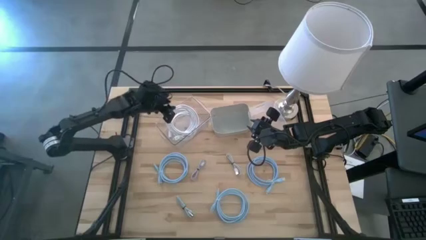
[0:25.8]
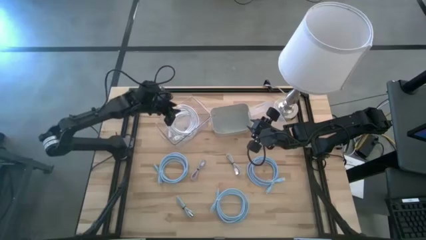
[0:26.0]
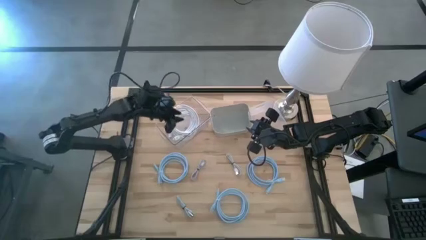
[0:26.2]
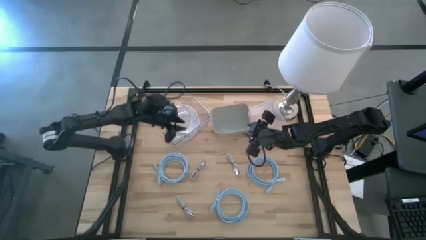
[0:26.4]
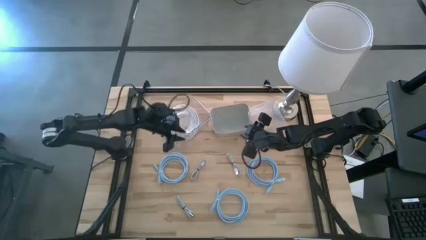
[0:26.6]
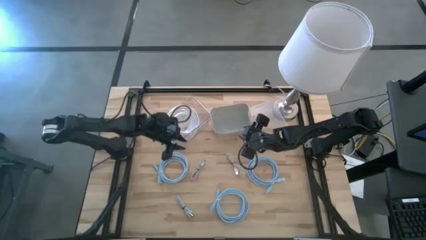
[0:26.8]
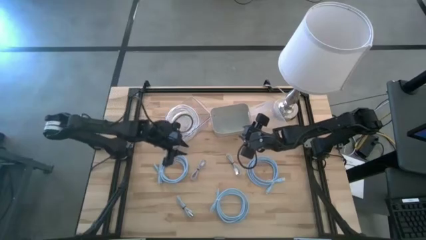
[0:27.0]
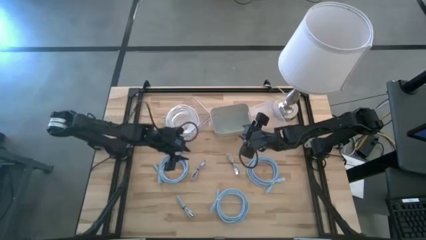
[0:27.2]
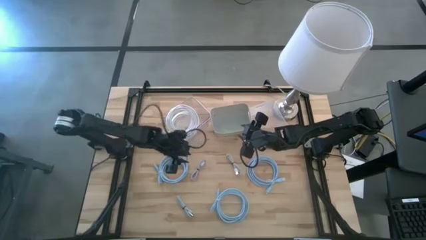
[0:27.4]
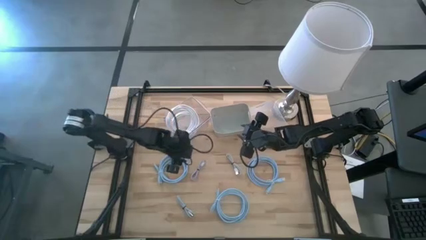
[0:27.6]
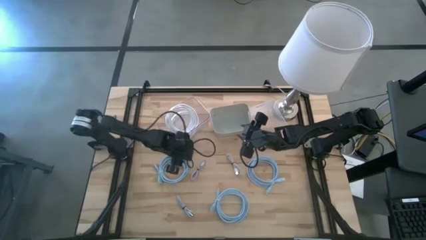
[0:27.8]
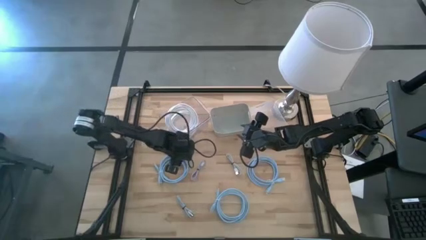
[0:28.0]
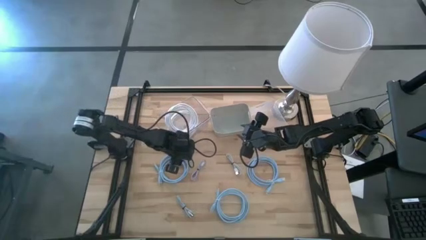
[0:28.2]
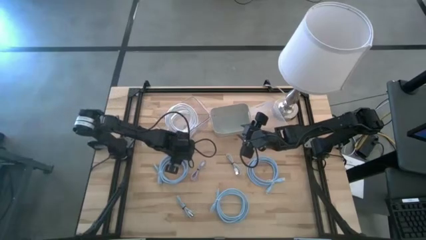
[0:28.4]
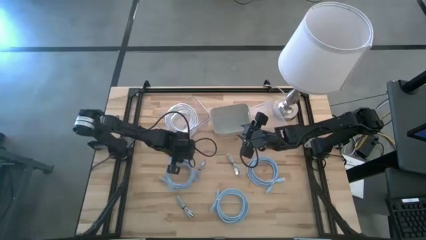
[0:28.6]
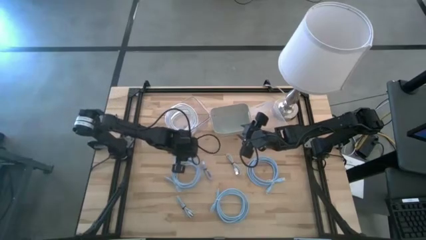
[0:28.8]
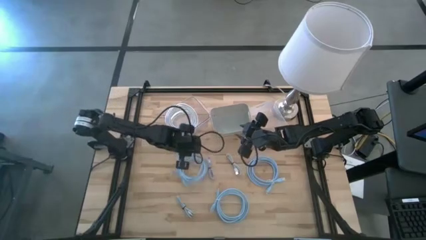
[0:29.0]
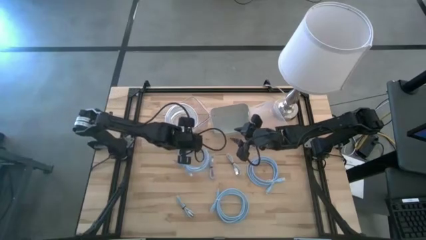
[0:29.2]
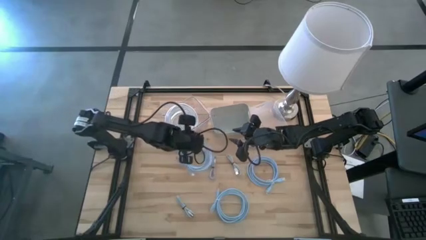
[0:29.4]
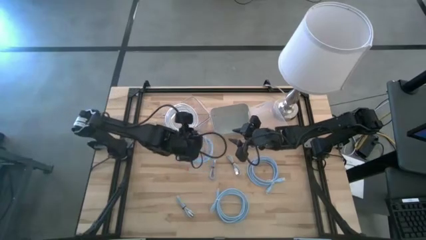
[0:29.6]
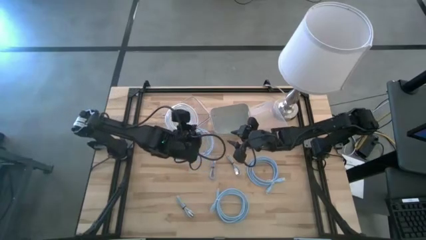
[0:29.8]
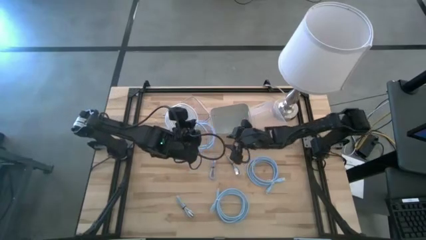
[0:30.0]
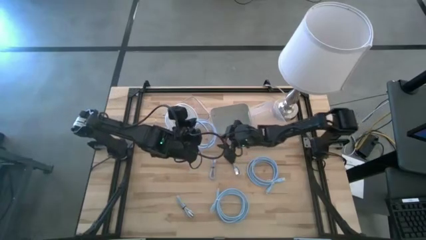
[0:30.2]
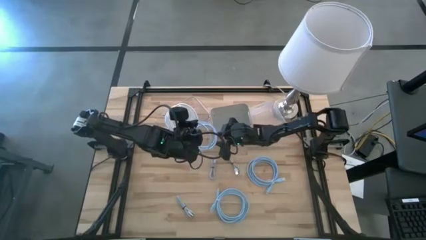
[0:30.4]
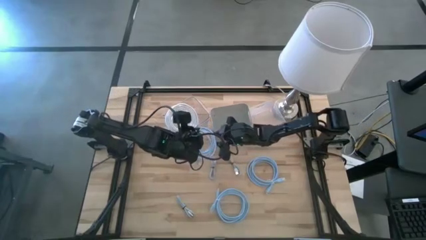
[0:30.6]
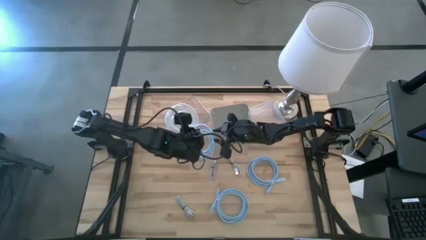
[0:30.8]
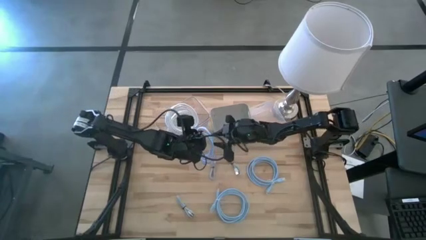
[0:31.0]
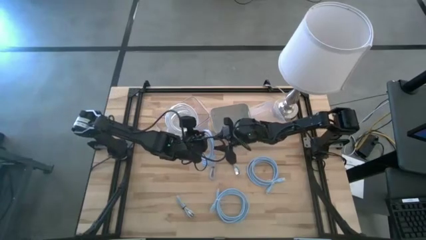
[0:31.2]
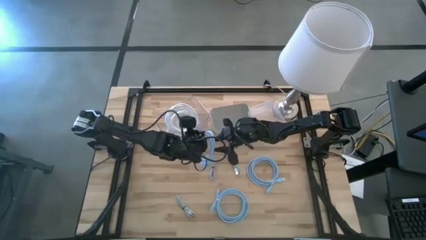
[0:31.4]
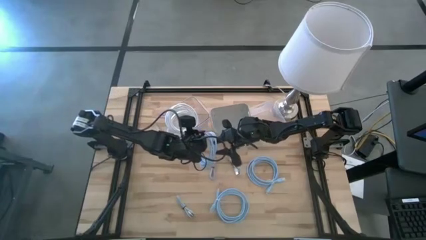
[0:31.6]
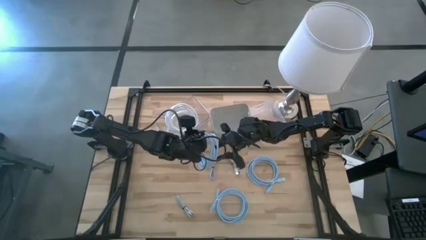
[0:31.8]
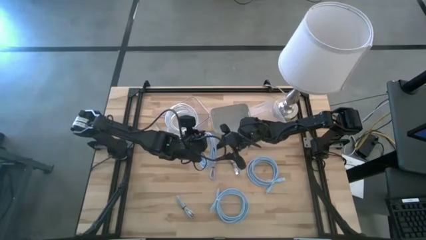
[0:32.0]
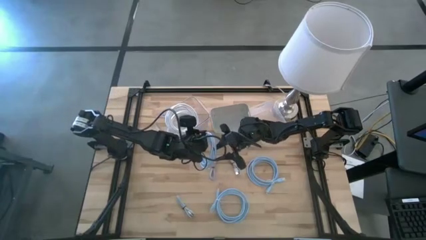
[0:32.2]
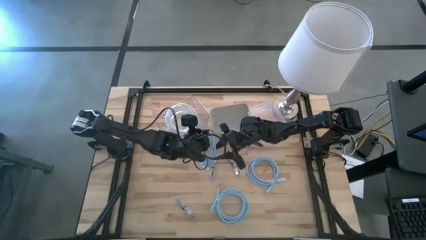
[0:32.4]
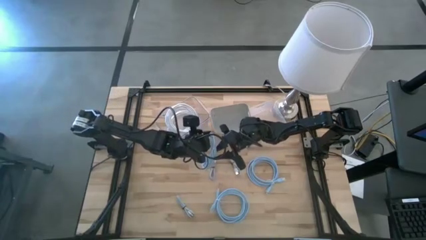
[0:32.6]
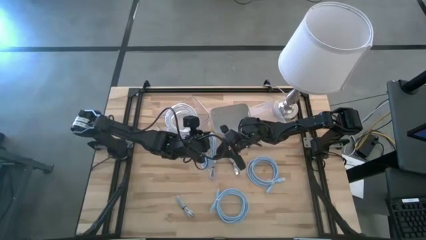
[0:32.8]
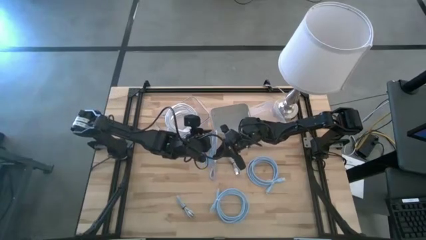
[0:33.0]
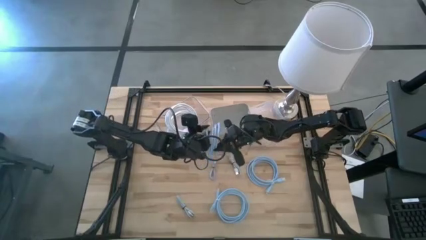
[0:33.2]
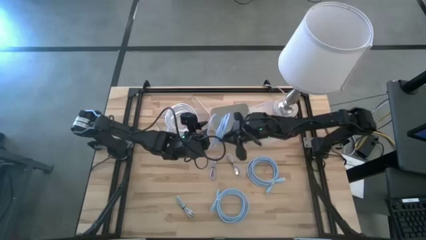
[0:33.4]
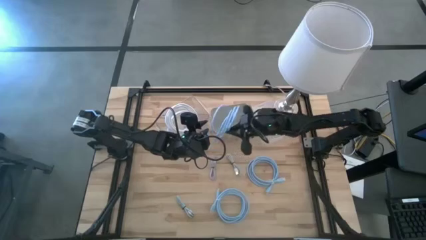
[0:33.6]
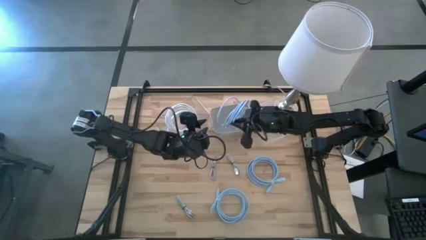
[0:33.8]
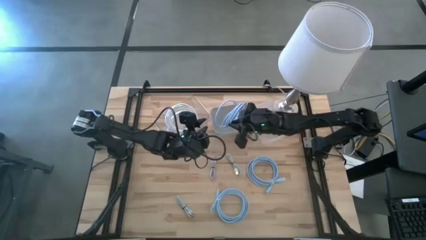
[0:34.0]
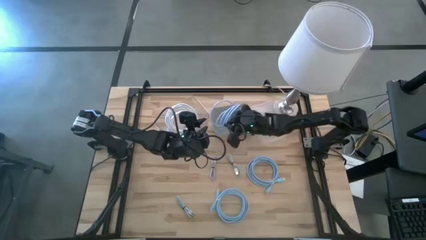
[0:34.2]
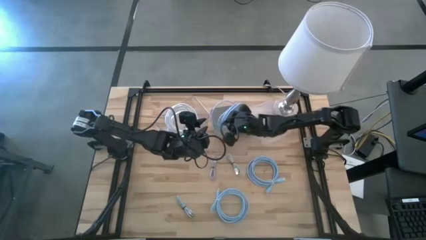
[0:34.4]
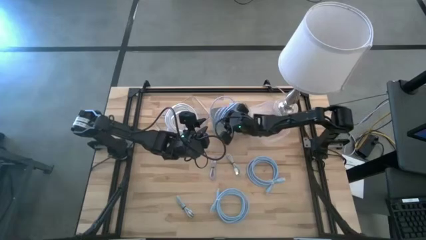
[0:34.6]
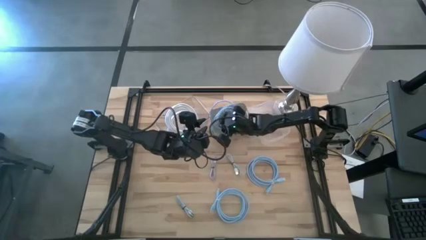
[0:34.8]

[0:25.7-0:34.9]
Task: Pick & Place USB Port
Put the top left blue HDMI cable into the gray bin

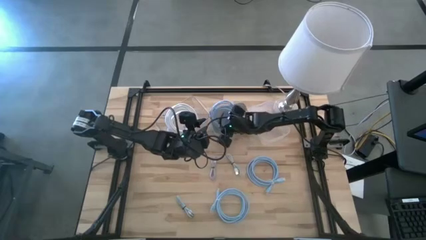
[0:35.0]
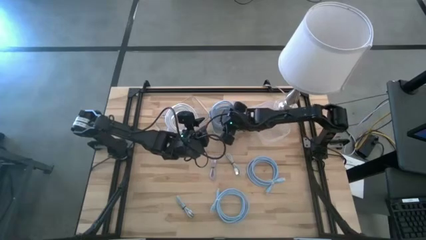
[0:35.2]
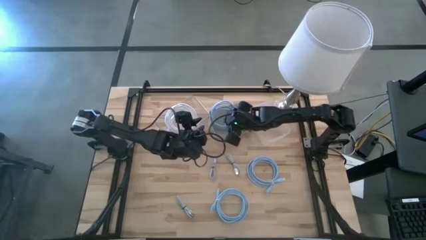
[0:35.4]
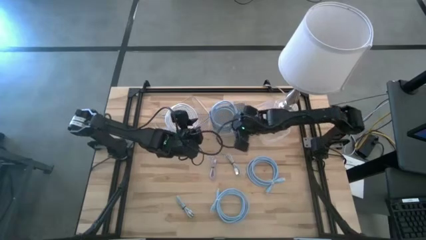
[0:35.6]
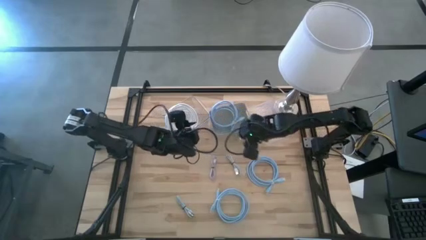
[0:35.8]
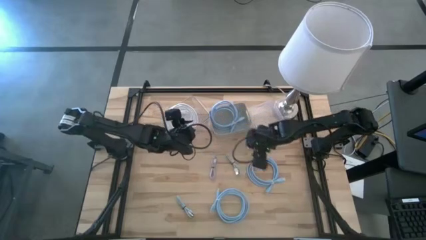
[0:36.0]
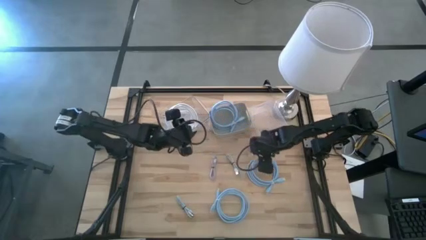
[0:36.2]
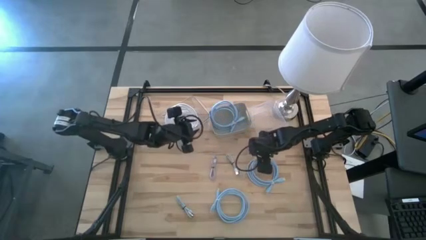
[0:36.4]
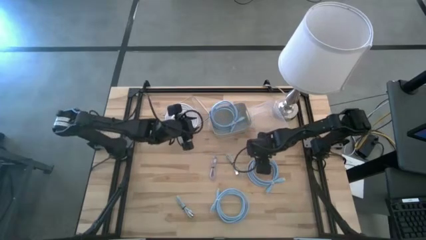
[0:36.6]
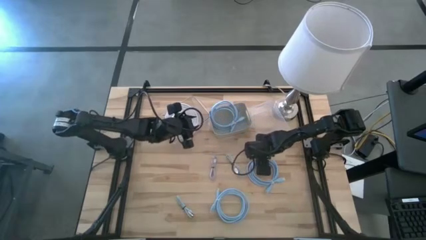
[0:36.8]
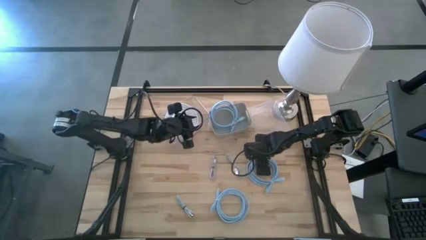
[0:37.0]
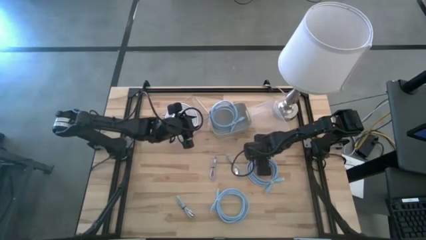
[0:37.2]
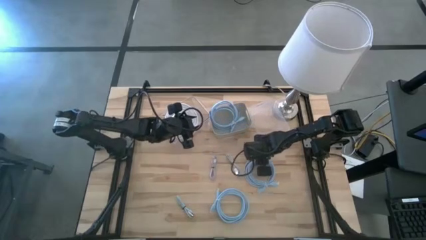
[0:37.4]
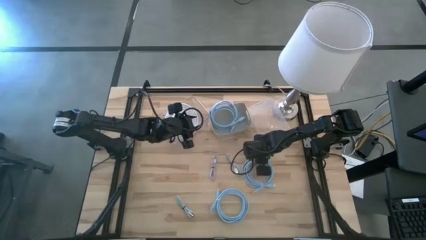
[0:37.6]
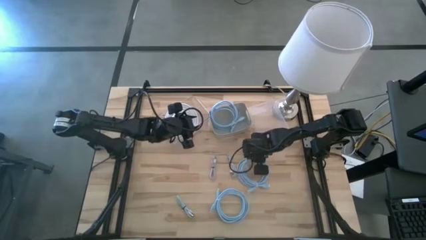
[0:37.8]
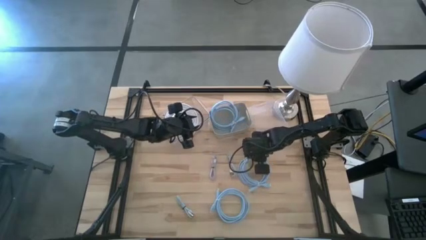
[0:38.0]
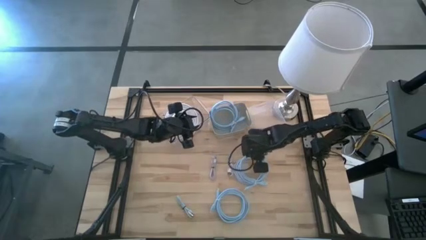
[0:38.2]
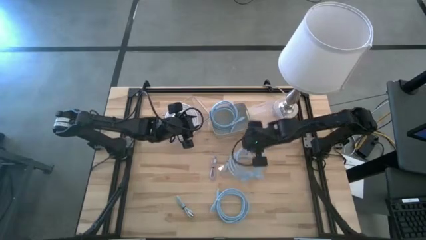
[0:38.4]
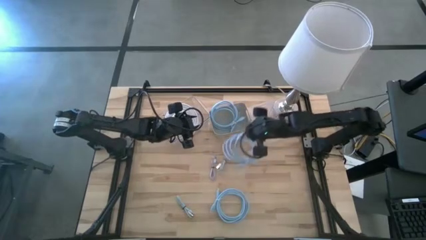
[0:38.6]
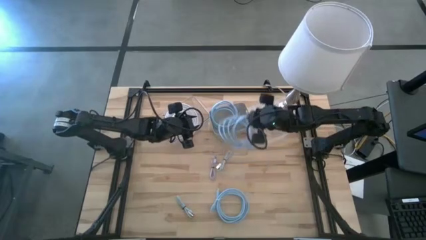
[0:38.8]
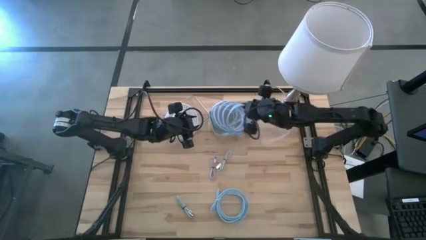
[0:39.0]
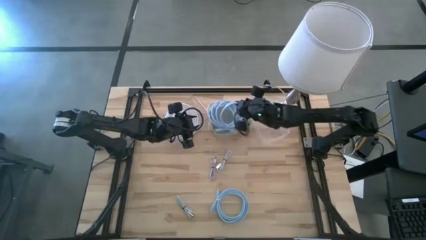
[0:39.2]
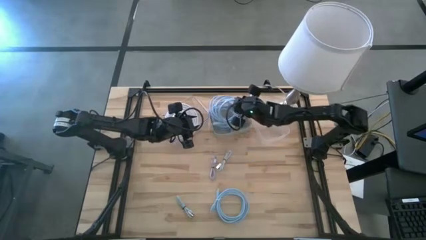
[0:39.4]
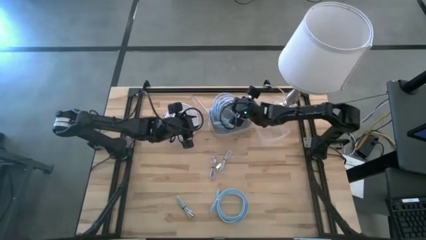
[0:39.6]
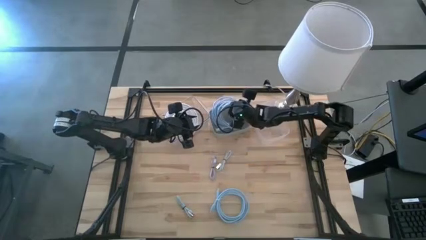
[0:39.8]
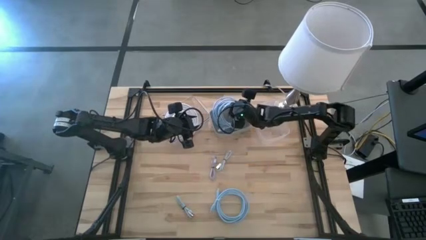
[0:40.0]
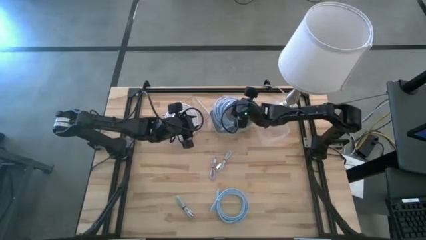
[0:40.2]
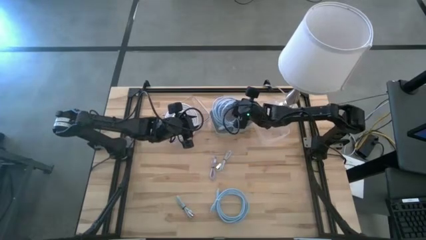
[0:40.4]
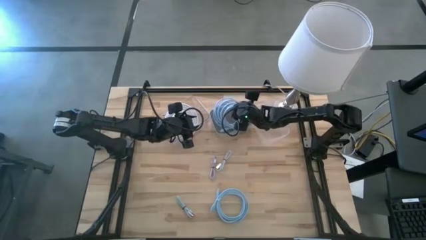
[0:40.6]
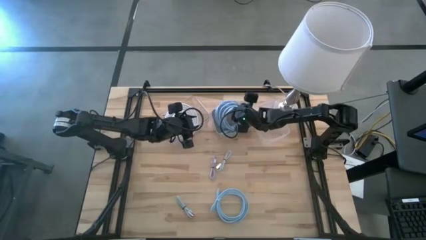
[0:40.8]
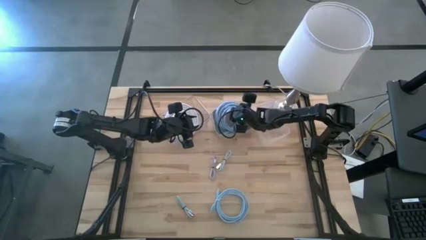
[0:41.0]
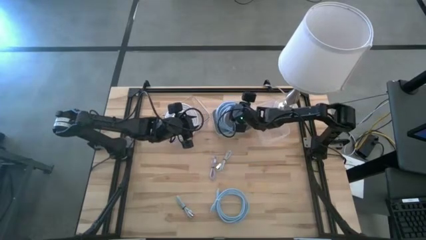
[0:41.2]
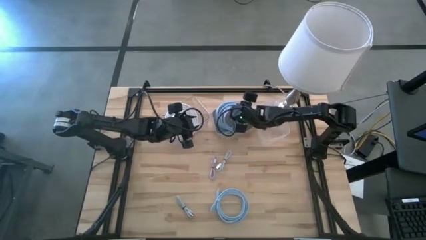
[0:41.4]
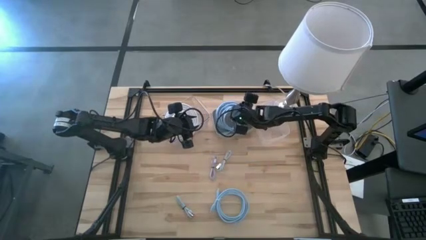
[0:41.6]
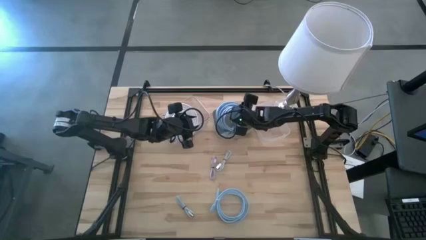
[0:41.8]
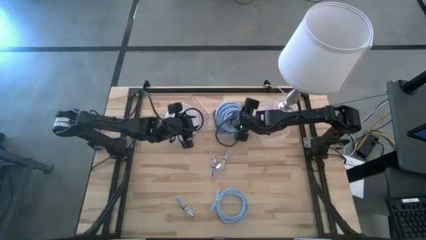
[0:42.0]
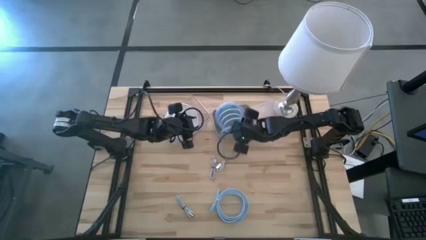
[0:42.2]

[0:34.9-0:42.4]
Put the top blue HDMI cable into the gray bin
